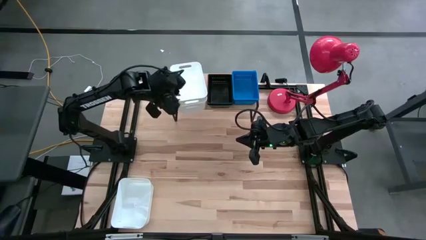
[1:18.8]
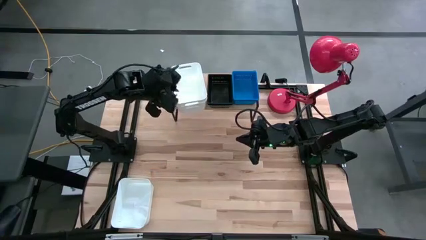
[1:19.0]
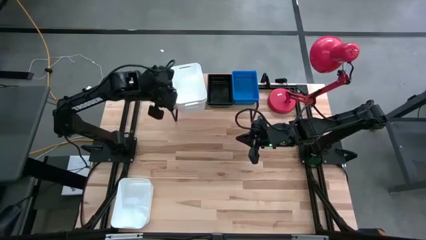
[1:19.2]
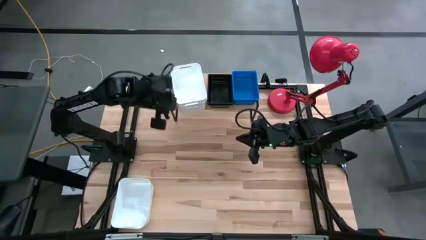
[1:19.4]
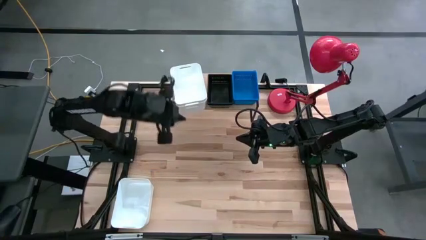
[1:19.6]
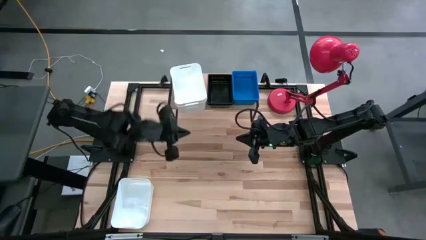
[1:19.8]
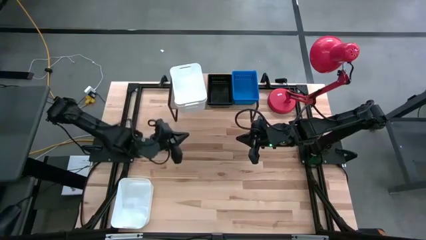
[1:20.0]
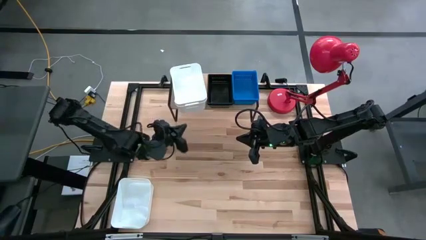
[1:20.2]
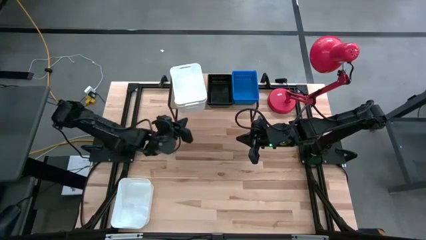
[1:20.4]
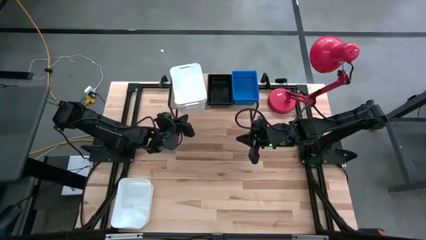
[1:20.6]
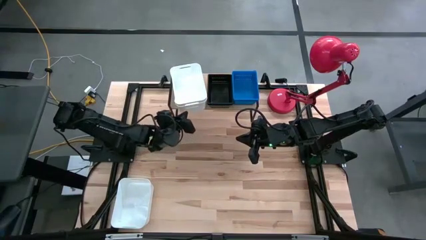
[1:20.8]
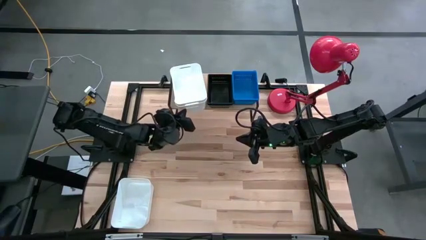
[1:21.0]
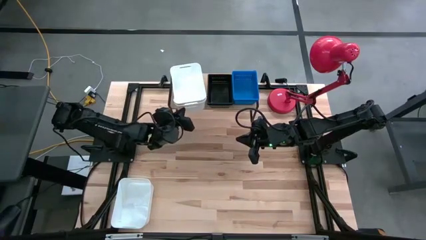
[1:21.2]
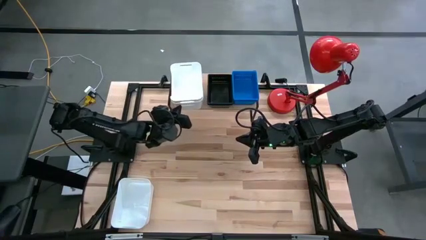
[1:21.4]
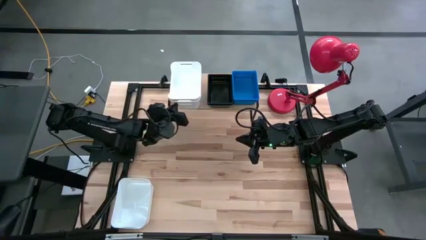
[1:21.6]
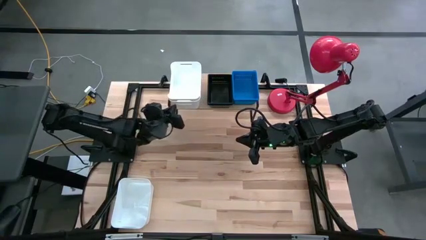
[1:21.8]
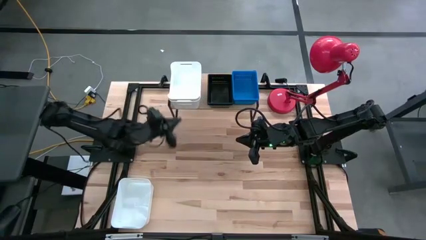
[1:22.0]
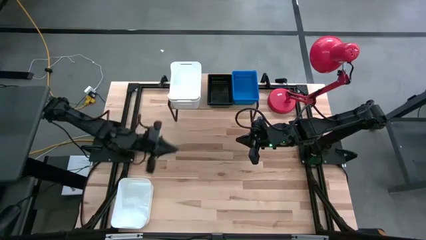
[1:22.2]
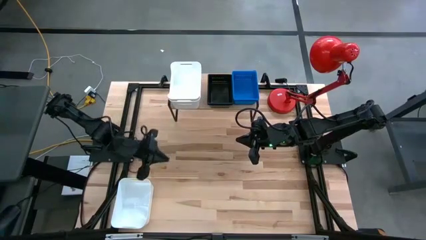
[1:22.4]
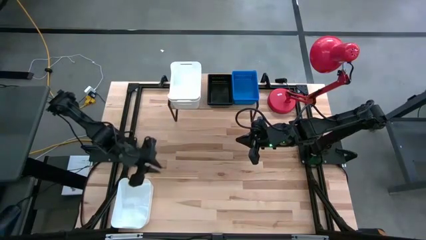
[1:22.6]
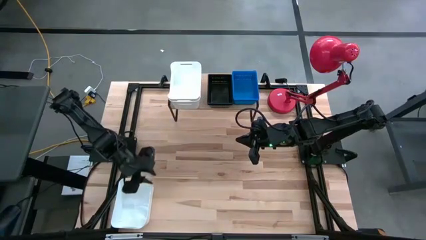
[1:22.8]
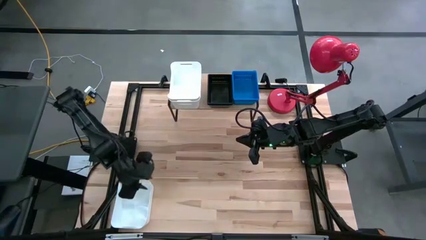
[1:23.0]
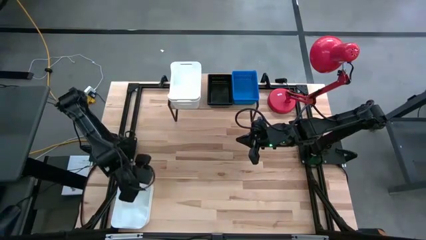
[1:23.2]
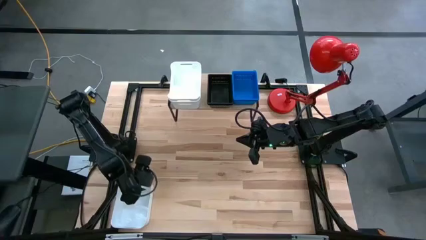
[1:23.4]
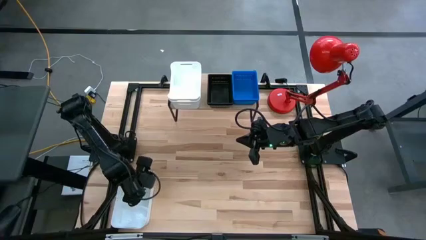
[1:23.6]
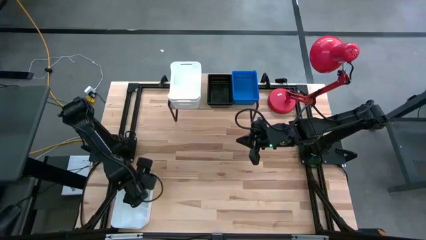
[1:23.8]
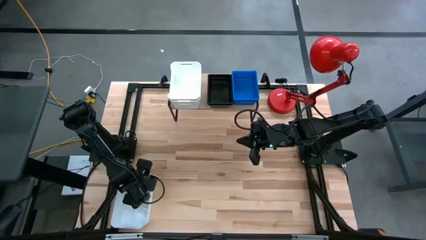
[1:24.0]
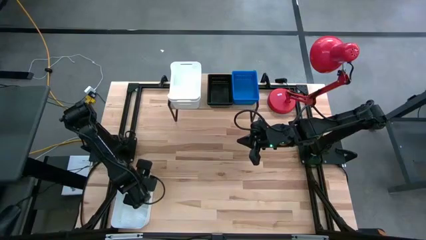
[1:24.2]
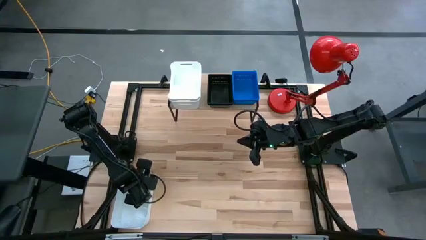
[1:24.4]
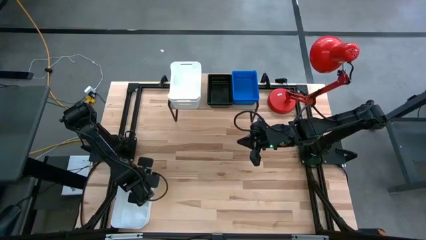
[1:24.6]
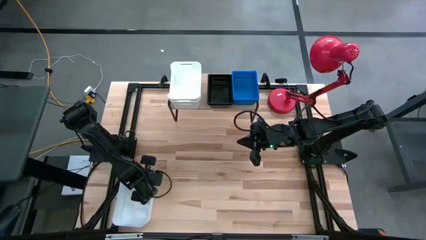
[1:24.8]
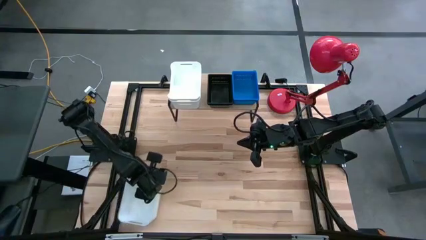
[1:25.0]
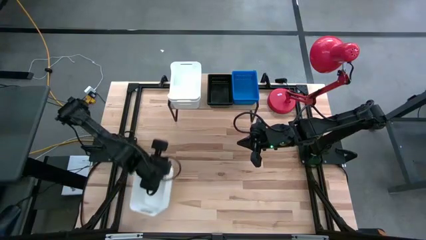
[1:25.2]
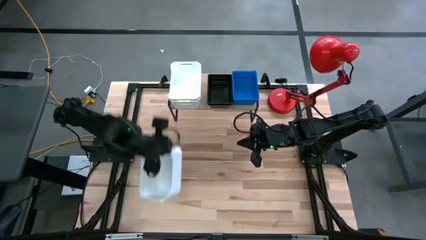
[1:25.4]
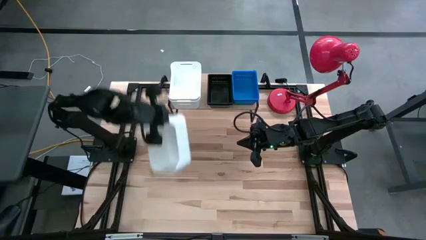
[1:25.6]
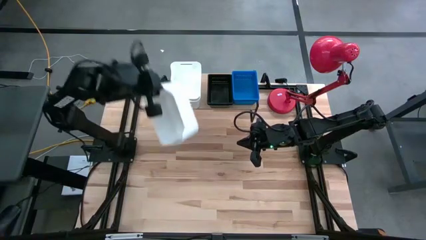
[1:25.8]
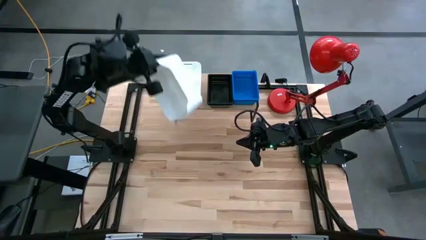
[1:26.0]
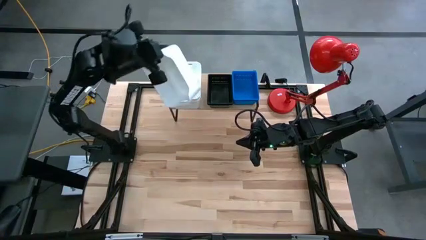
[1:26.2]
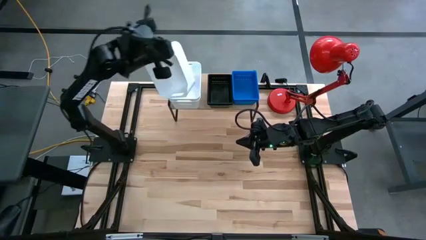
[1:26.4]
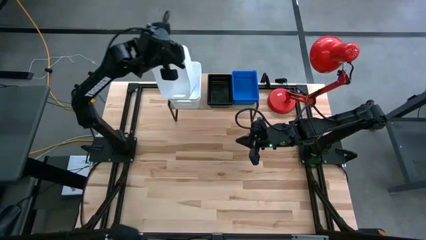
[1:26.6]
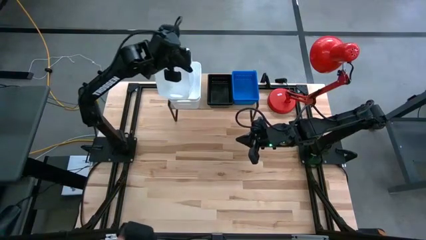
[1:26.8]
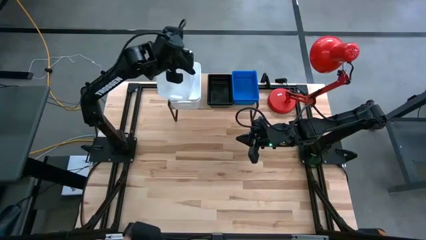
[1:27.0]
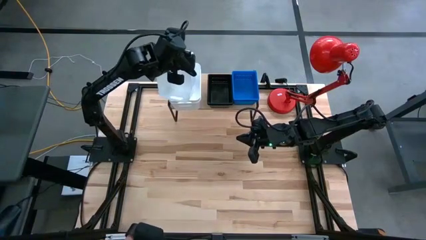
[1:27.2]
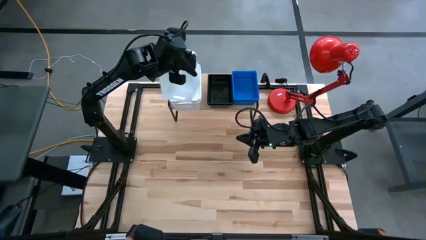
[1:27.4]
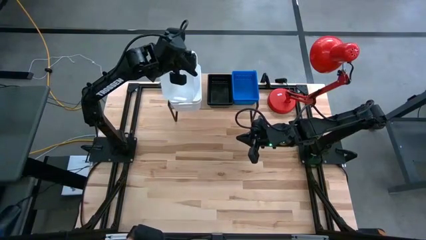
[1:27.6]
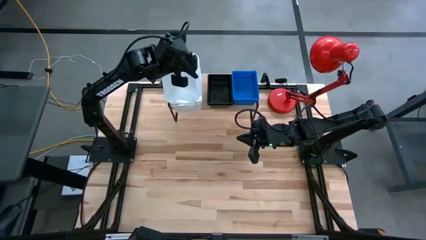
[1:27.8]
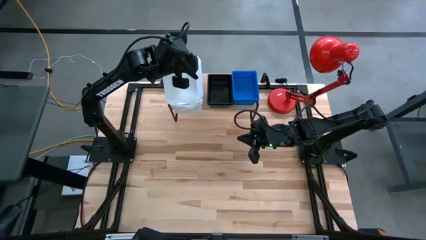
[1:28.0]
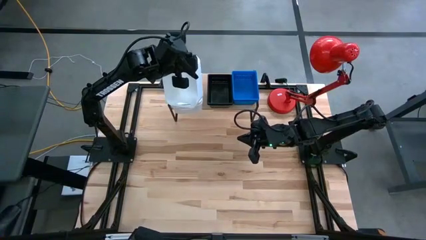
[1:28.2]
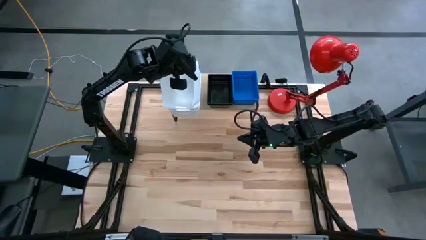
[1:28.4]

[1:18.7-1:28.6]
Task: Stack baskets on shelf by color
Stack the white bin on top of the white bin on the shelf

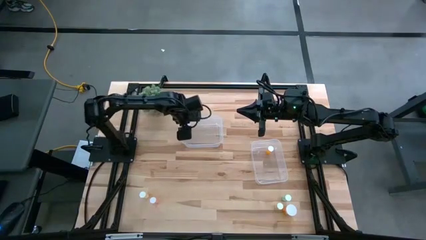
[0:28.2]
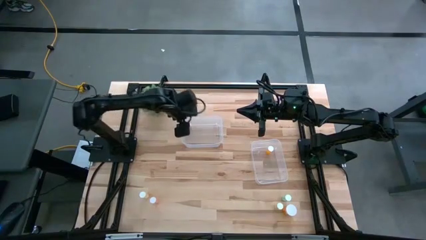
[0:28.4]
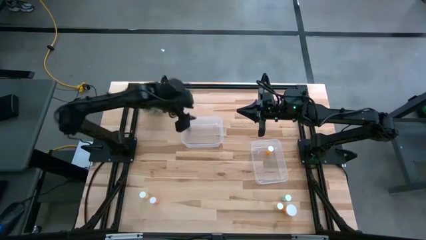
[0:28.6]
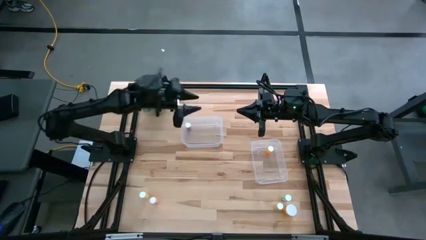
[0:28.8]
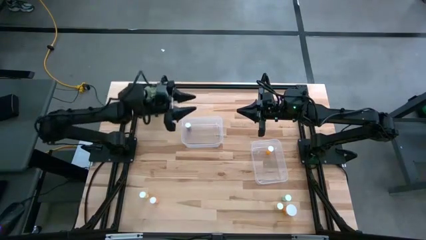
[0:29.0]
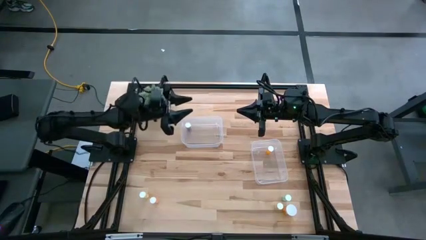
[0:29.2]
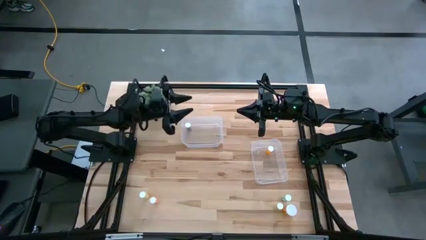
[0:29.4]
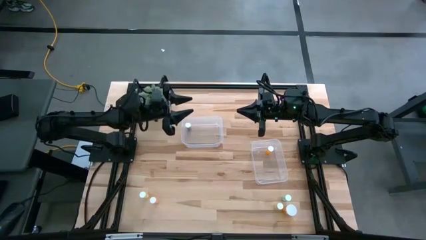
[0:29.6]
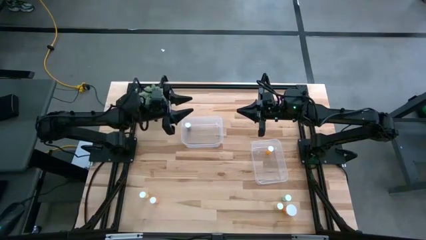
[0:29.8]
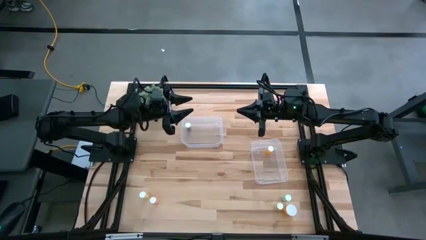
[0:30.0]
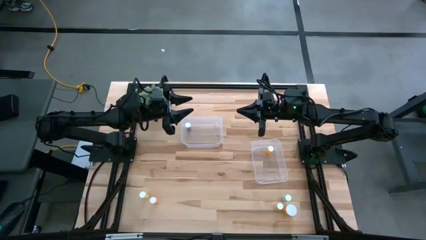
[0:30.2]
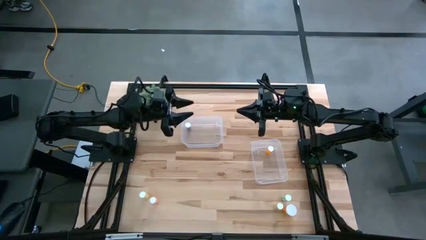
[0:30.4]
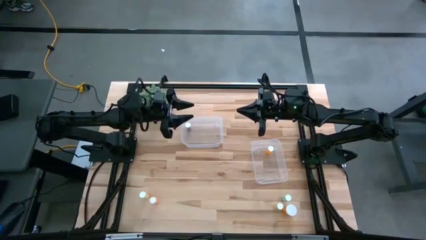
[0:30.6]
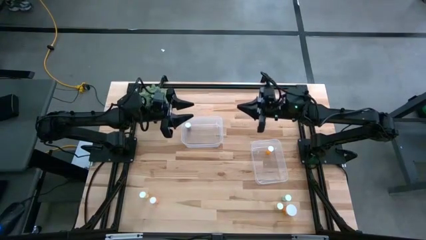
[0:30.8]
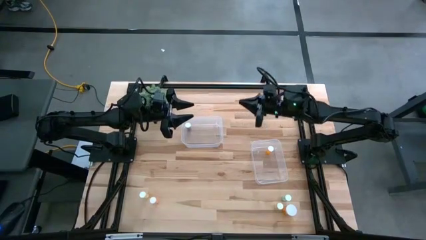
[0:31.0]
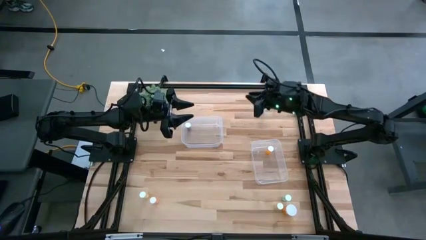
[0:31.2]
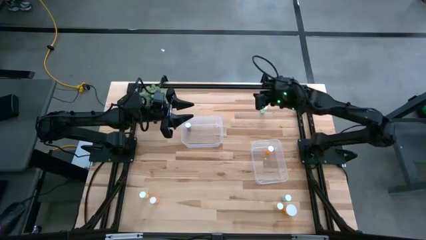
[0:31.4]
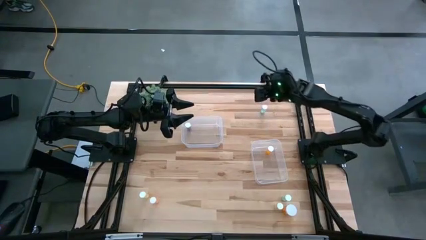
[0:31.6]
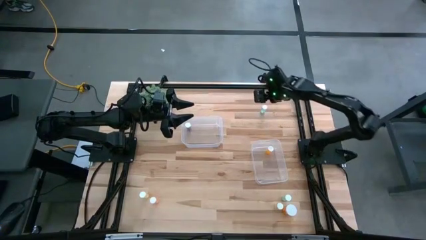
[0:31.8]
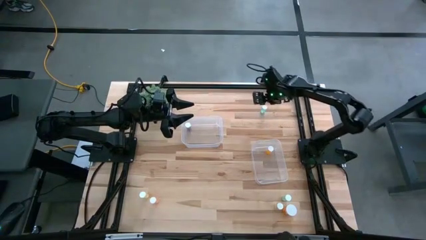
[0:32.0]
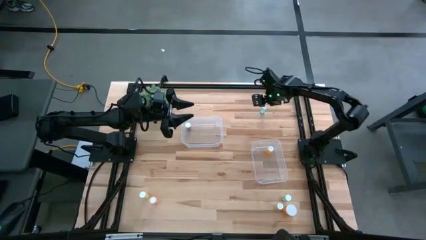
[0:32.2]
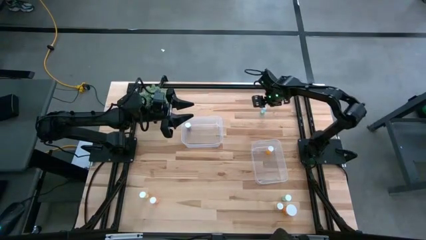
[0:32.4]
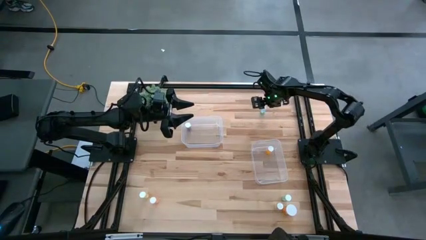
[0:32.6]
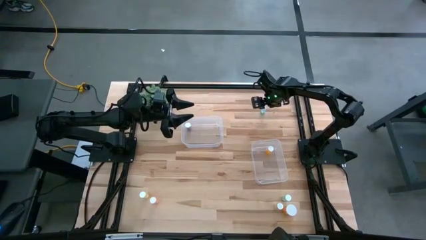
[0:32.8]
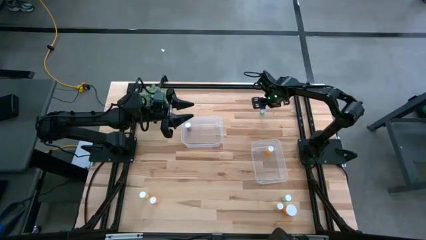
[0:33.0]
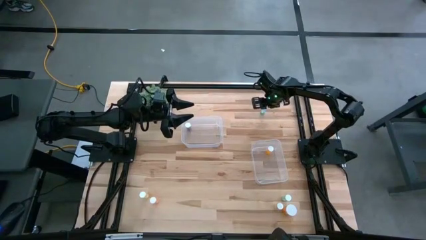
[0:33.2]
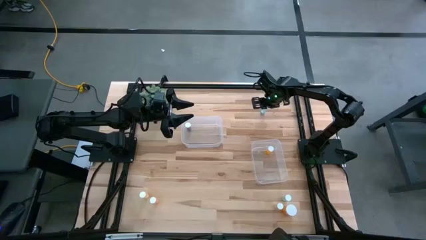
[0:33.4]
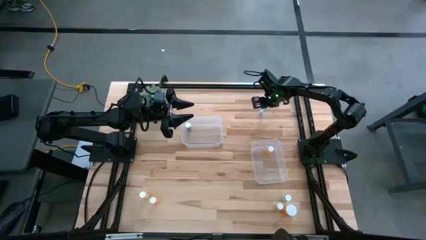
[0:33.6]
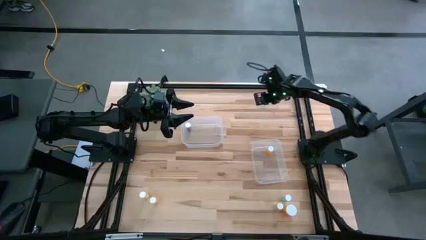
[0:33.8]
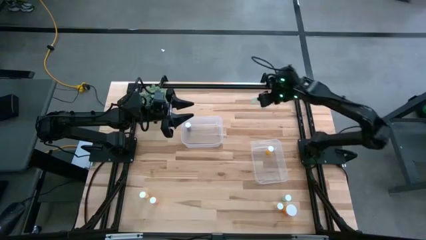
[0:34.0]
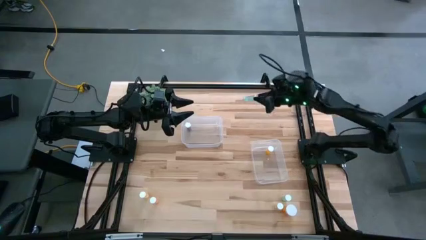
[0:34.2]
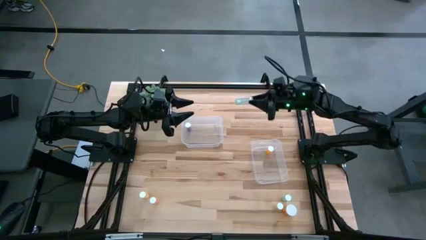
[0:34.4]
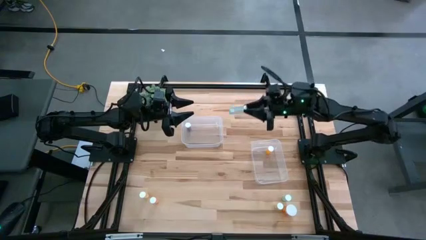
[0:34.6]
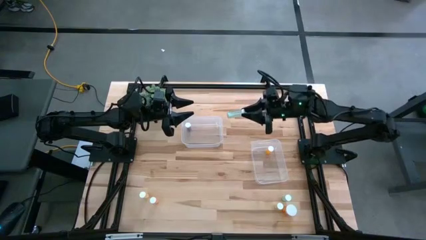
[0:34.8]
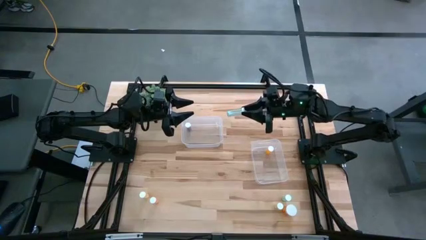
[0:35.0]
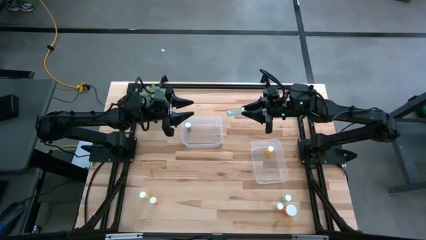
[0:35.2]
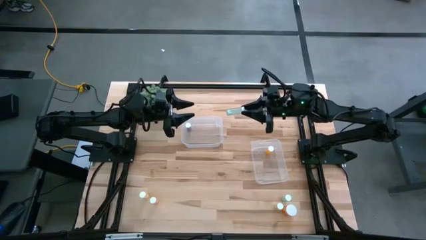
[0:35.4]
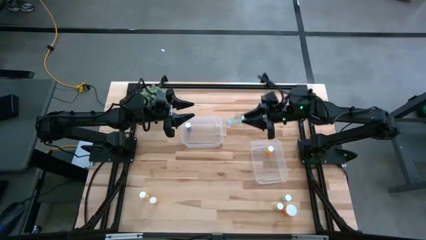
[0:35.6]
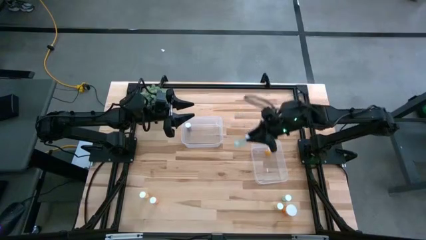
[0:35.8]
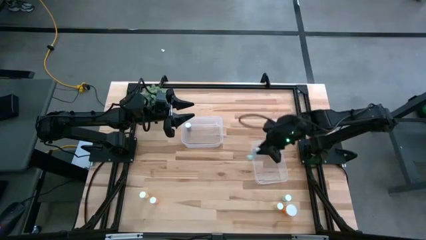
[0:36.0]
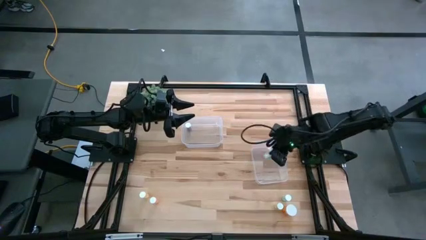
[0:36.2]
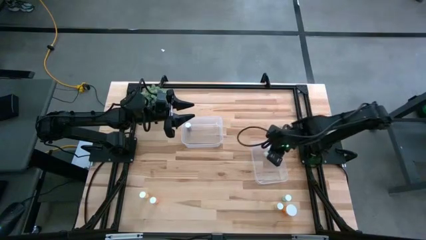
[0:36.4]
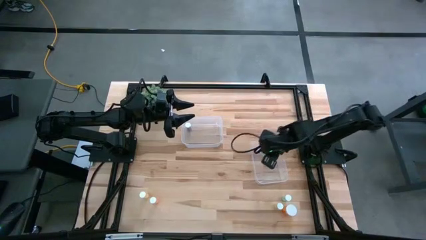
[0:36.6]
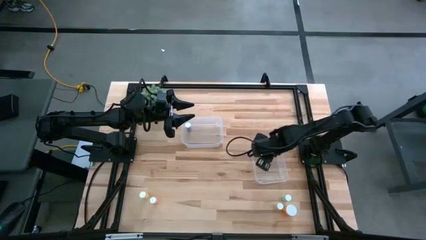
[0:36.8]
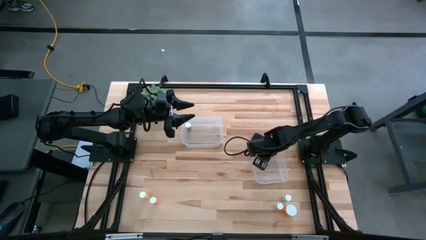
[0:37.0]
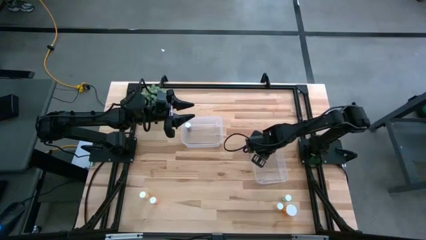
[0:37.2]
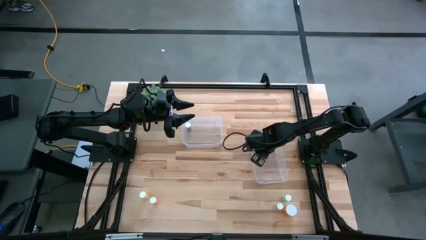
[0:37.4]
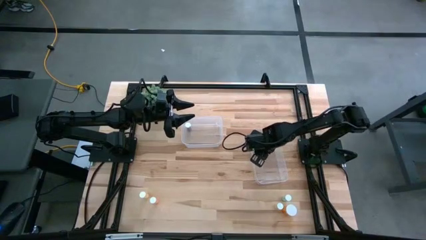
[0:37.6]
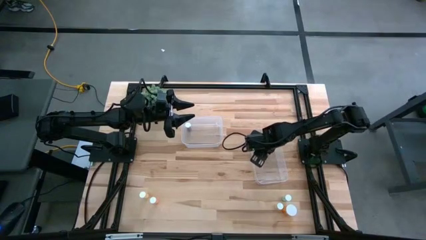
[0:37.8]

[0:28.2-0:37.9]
Task: Pick and place medicine bottles into bin by pill shape (circle, oval)
Put the top blue tablet bottle into the bottom transparent bin
